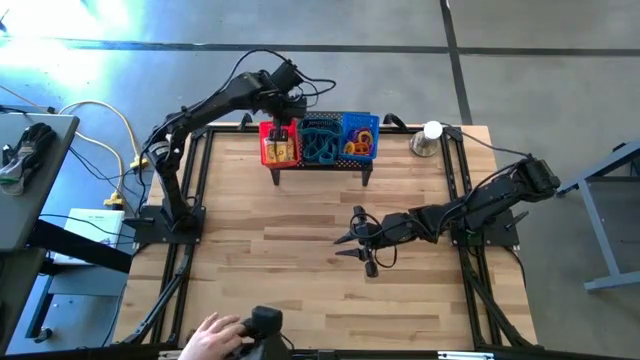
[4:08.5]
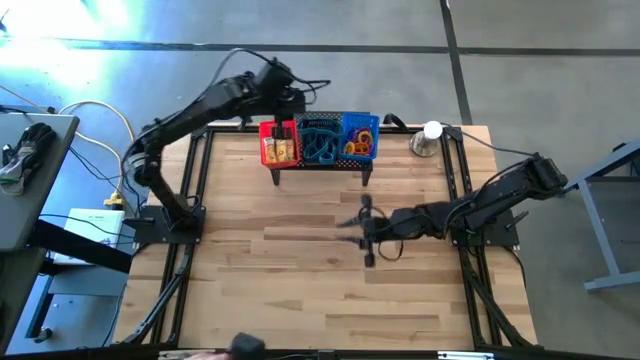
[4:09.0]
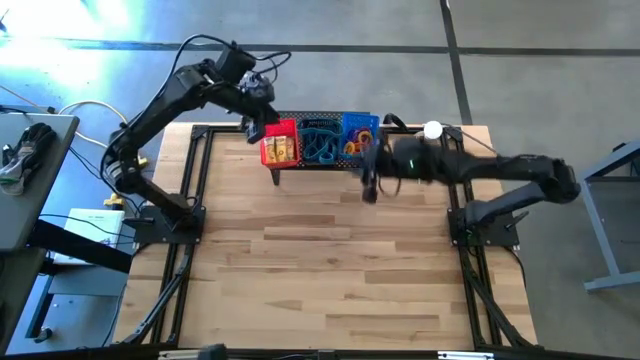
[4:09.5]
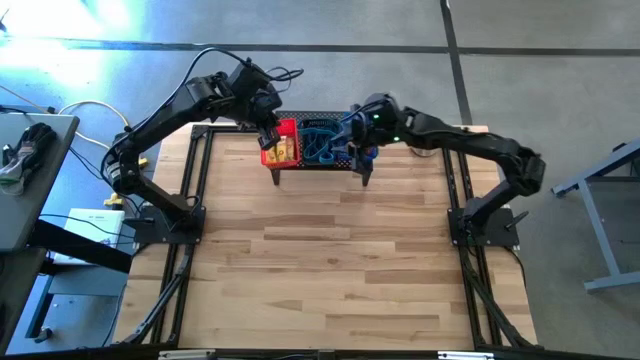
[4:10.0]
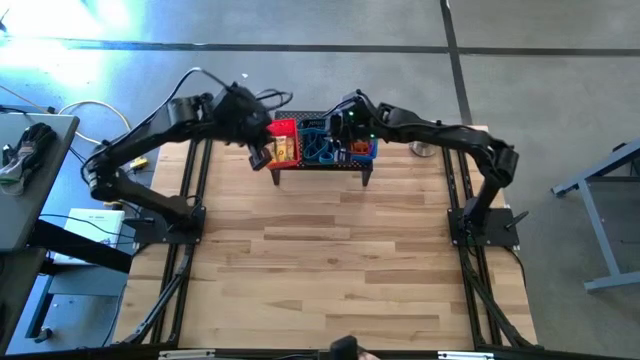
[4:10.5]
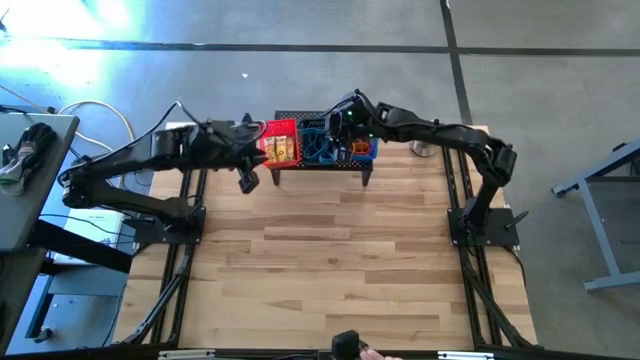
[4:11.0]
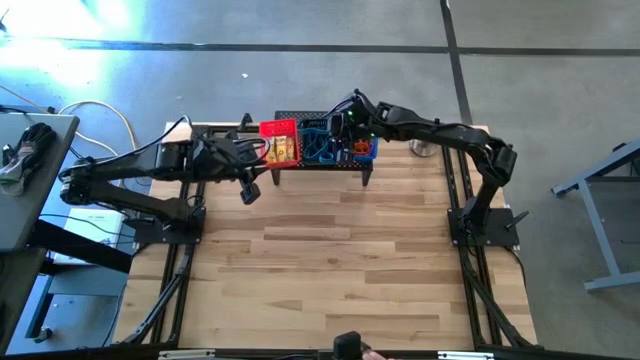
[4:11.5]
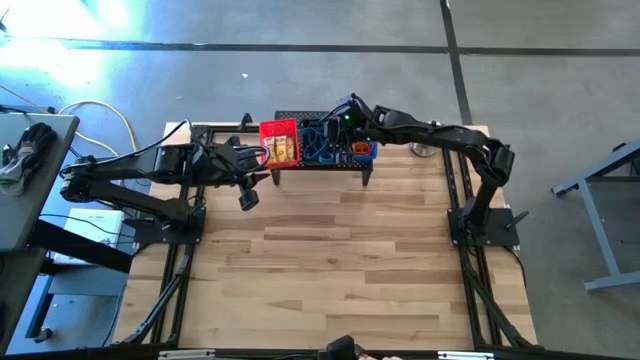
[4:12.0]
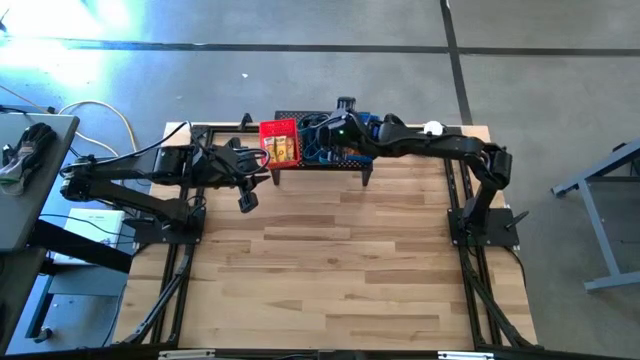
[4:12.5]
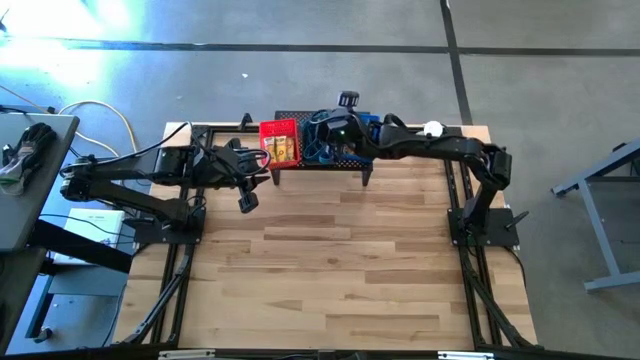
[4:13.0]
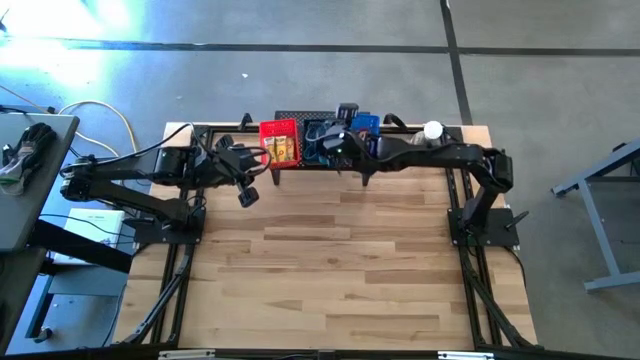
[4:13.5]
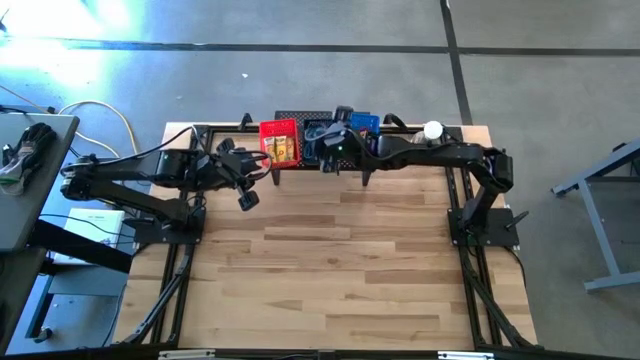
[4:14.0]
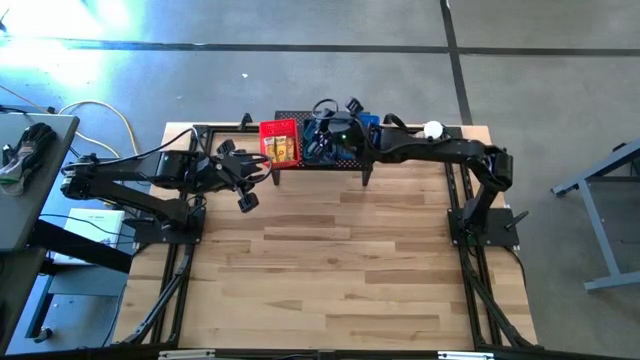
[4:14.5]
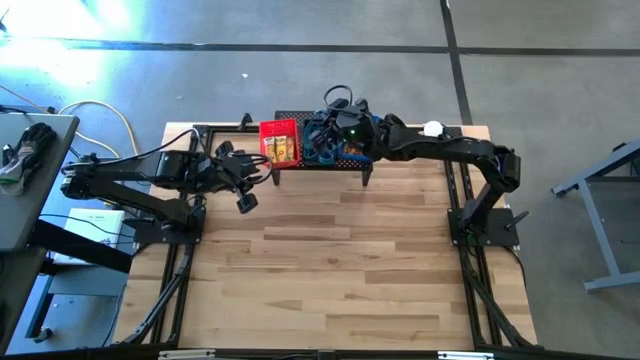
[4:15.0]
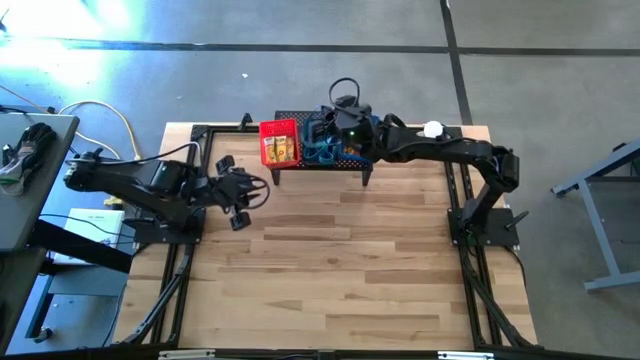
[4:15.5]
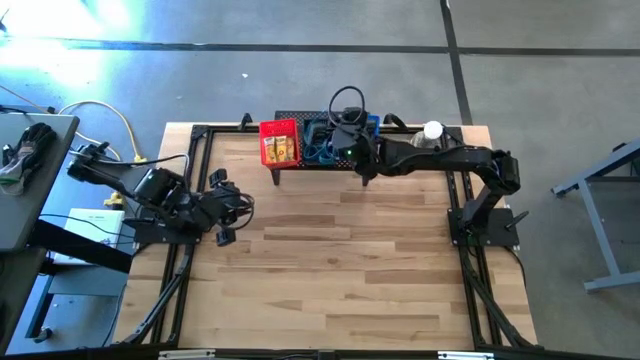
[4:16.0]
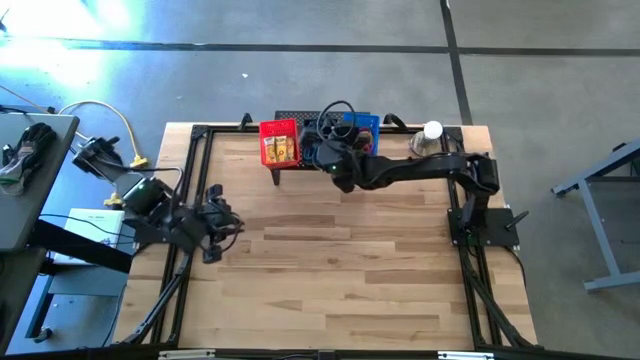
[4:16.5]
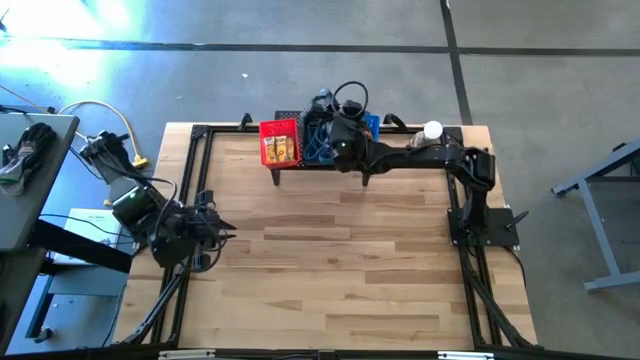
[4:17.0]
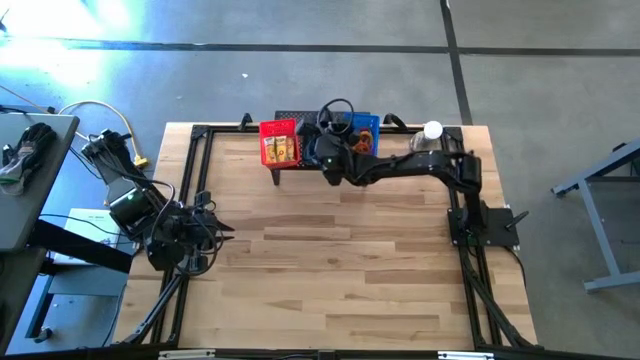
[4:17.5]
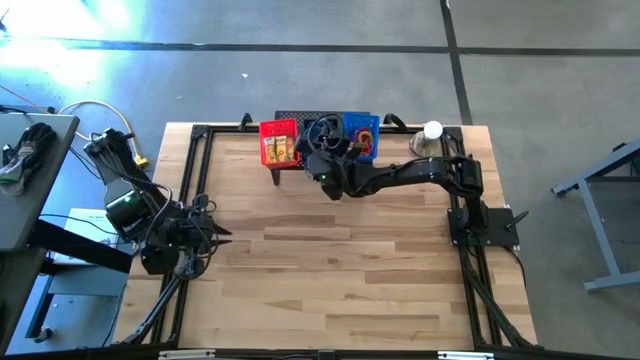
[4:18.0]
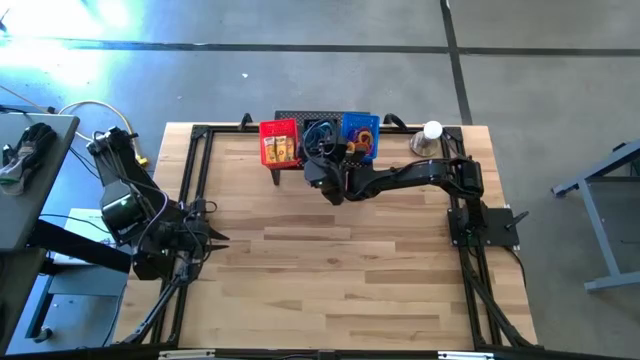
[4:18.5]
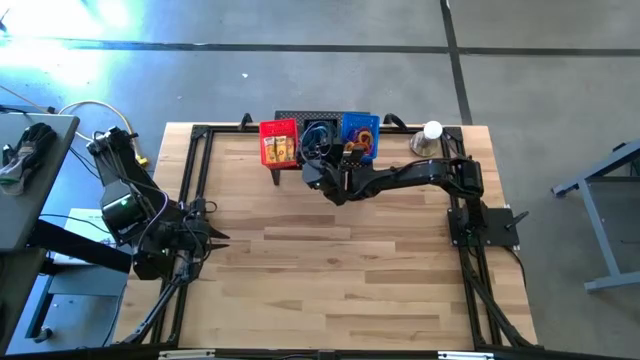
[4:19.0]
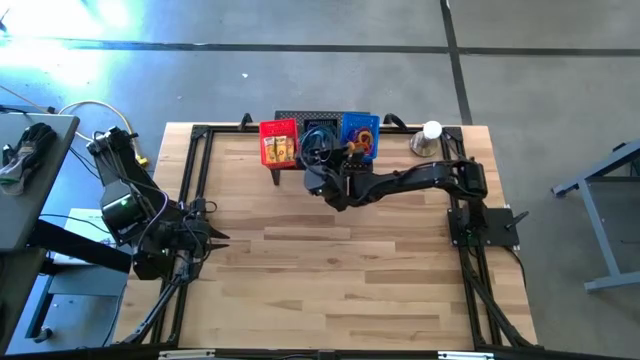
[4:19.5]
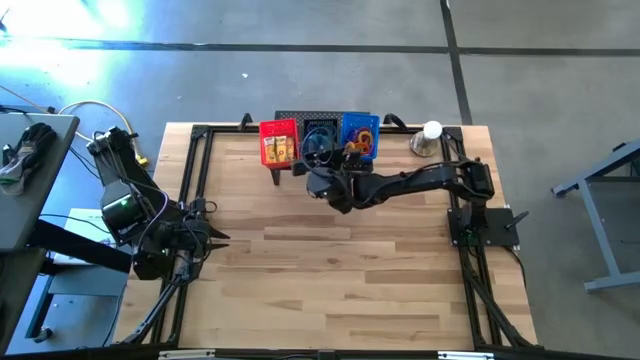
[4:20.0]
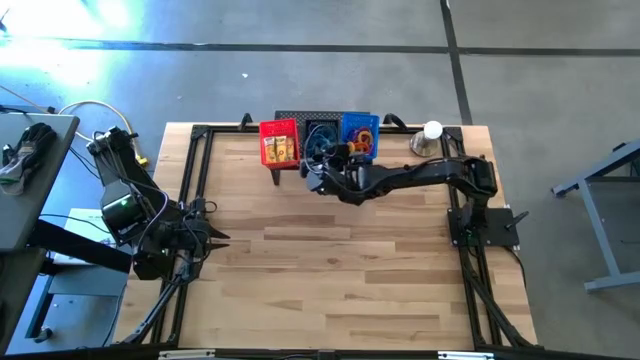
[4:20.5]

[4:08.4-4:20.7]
Task: Pick & Place Office Desk Supplies
Adjust the blue rubber band in the black bin on the shelf

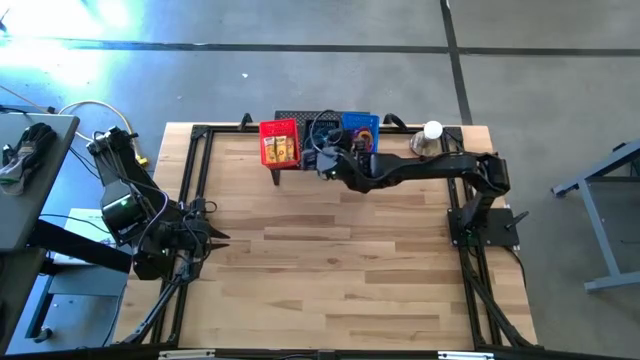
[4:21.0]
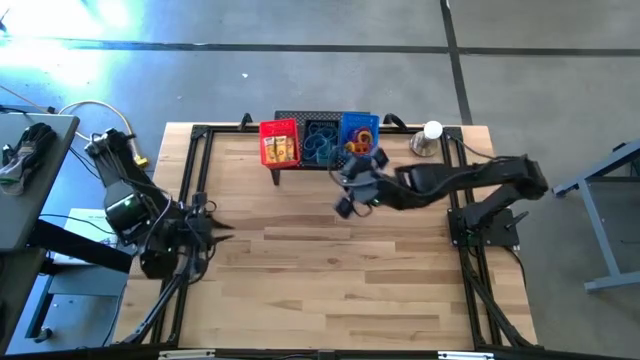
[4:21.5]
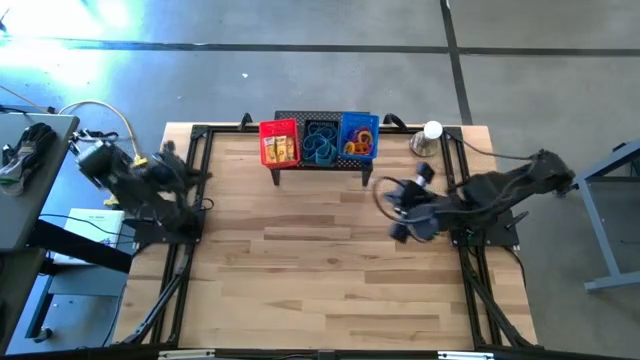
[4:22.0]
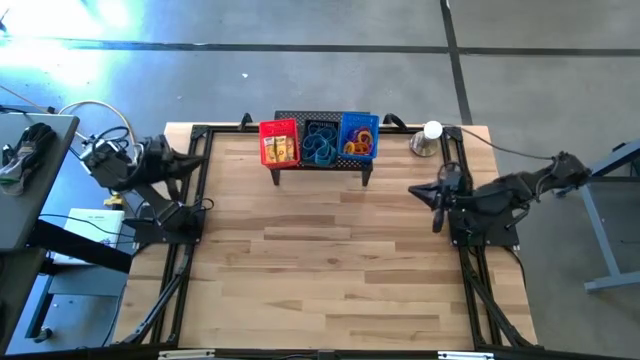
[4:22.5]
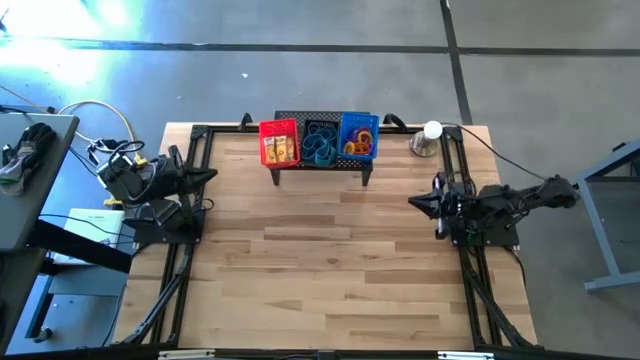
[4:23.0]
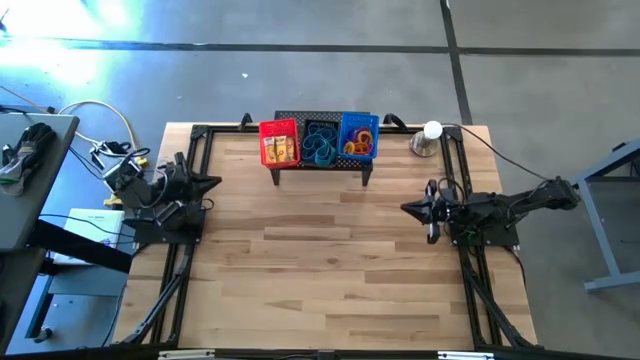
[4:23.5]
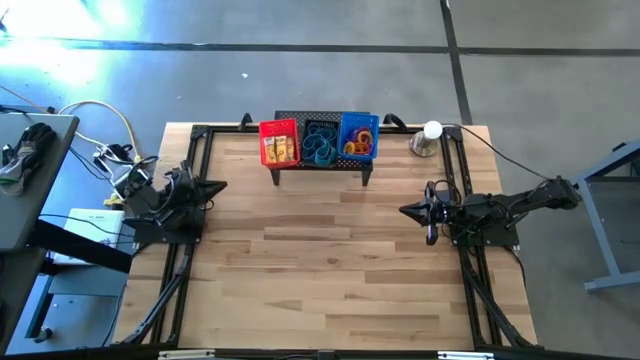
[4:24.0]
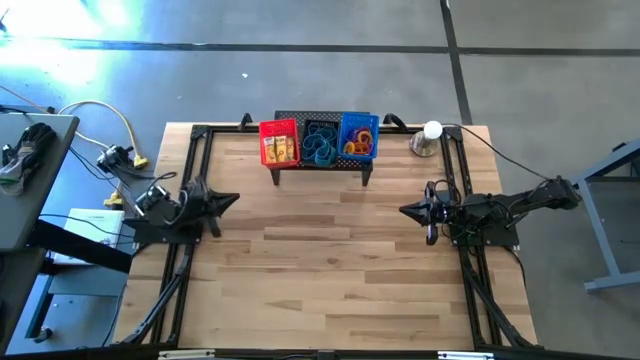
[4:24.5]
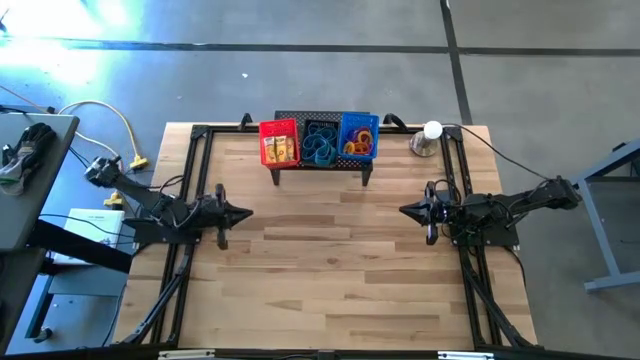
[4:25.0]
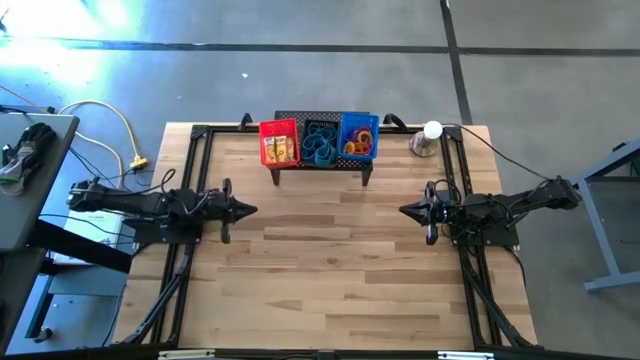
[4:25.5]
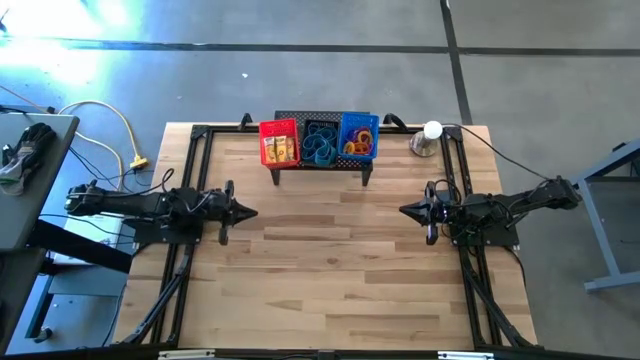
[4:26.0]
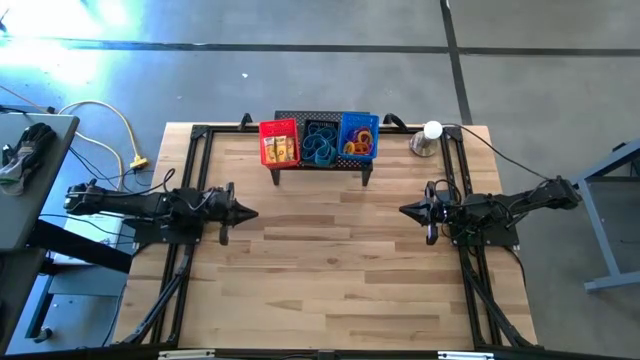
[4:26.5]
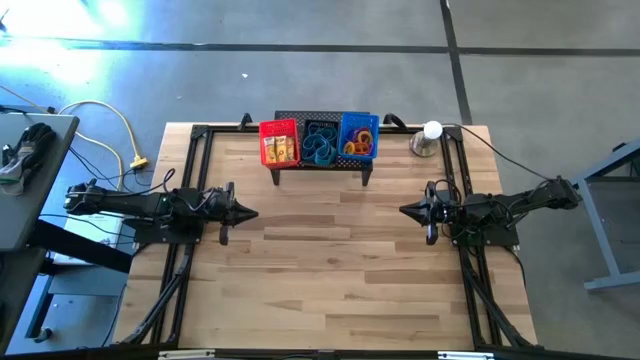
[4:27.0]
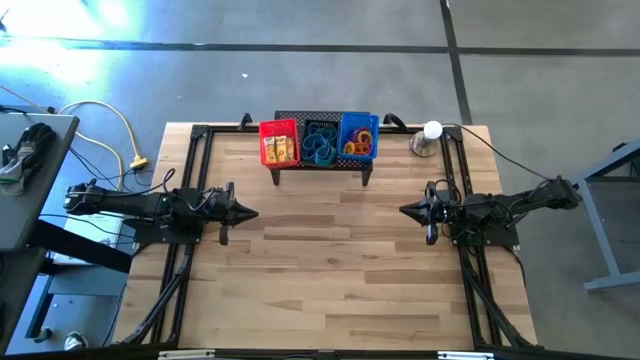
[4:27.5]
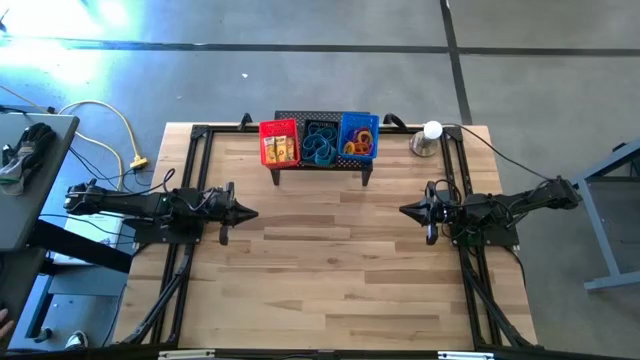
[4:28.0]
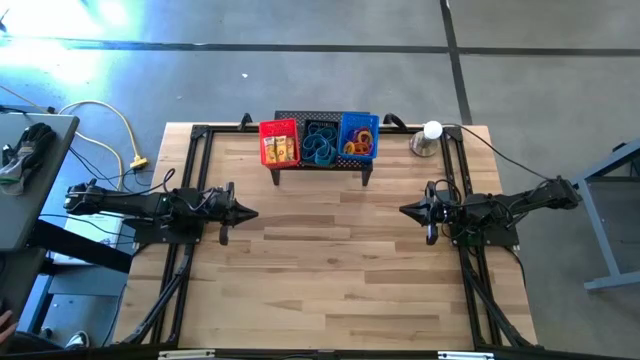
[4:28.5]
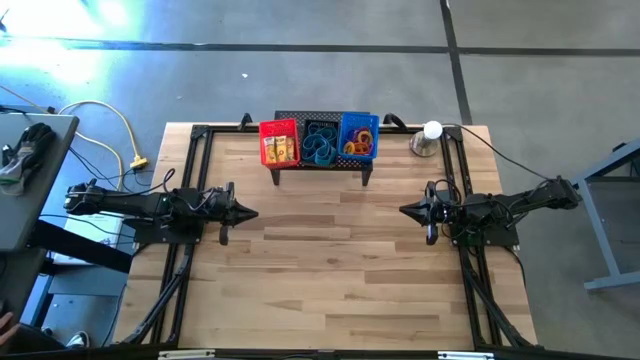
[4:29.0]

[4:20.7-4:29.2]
Return to Home Position
